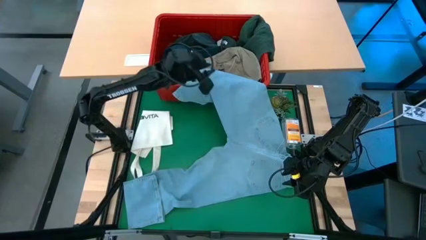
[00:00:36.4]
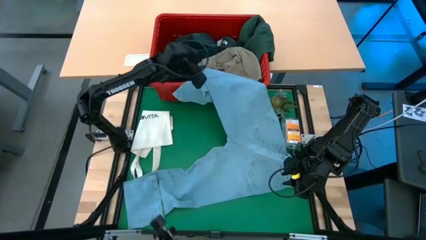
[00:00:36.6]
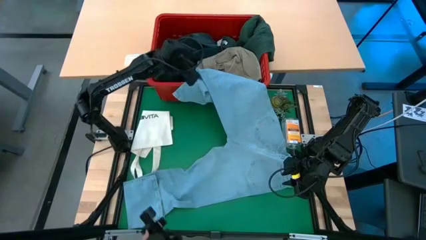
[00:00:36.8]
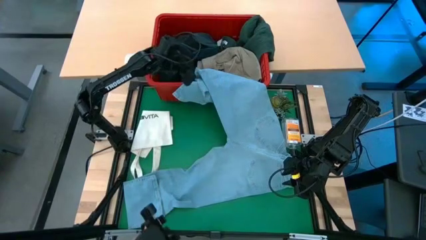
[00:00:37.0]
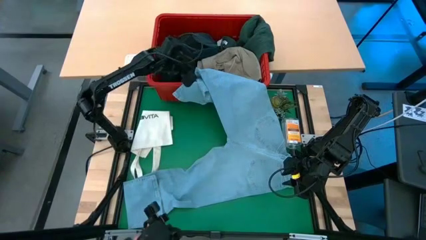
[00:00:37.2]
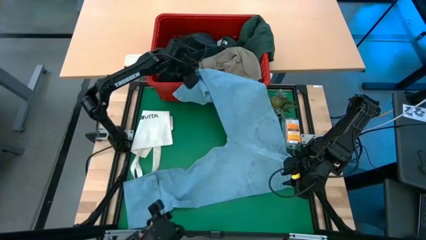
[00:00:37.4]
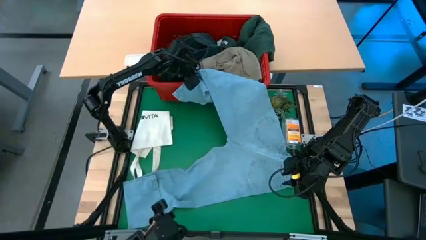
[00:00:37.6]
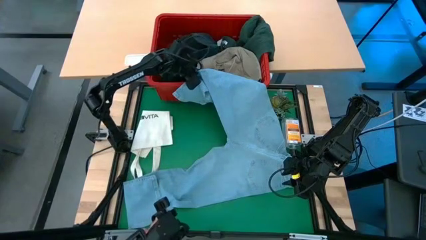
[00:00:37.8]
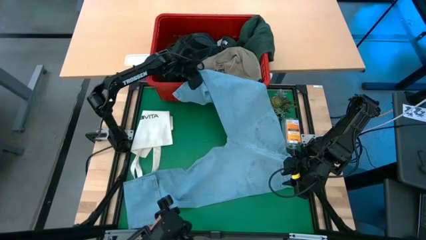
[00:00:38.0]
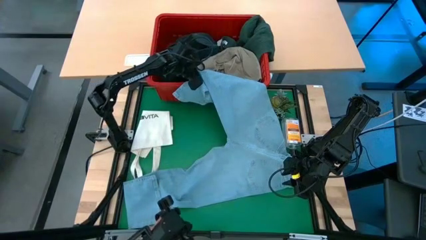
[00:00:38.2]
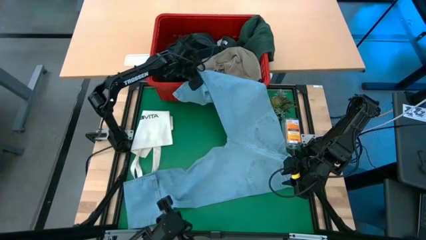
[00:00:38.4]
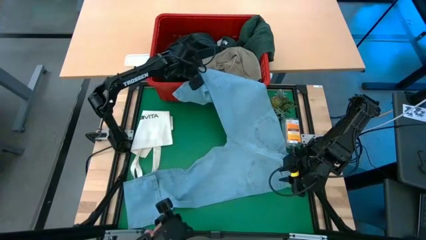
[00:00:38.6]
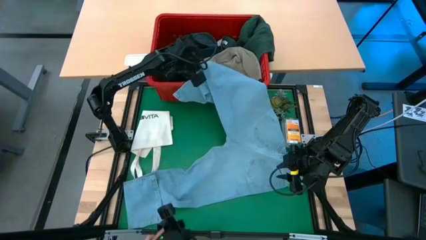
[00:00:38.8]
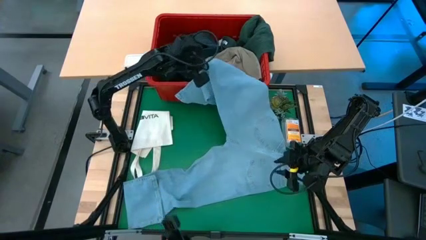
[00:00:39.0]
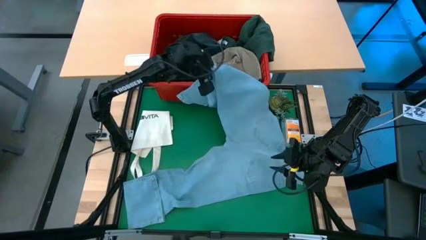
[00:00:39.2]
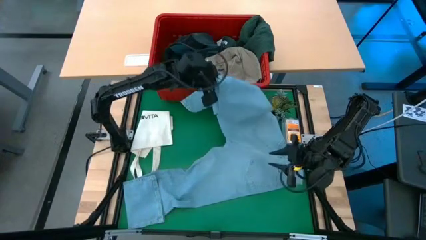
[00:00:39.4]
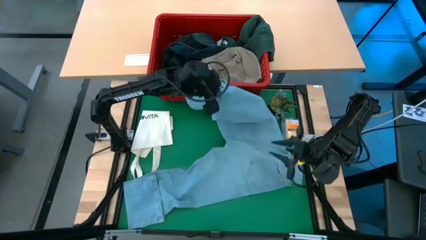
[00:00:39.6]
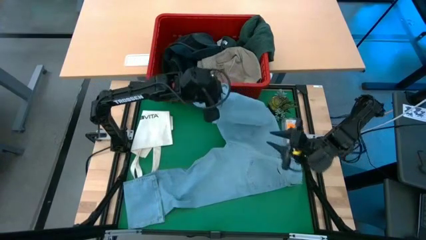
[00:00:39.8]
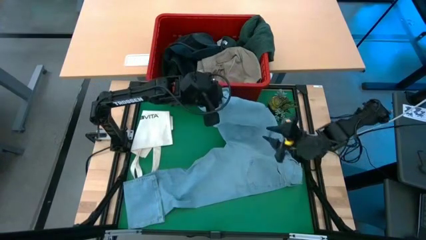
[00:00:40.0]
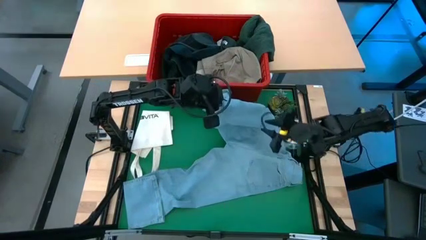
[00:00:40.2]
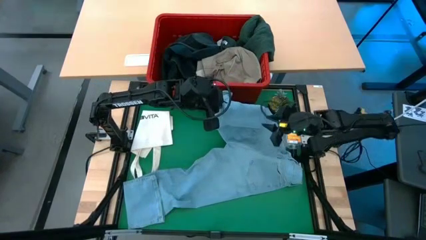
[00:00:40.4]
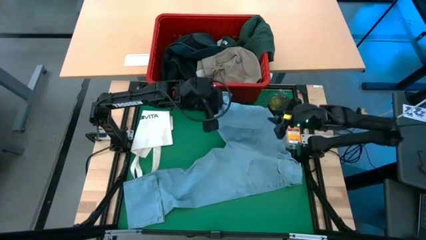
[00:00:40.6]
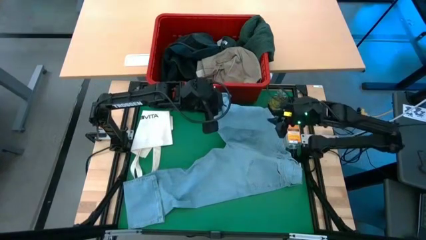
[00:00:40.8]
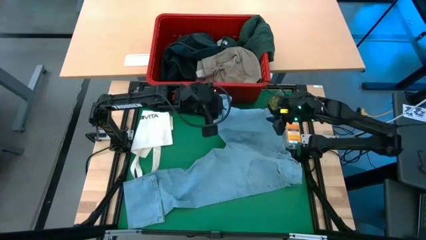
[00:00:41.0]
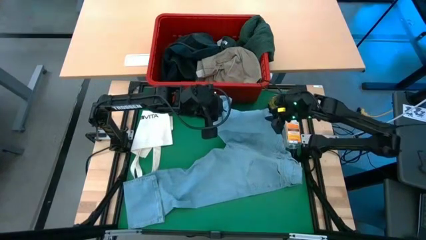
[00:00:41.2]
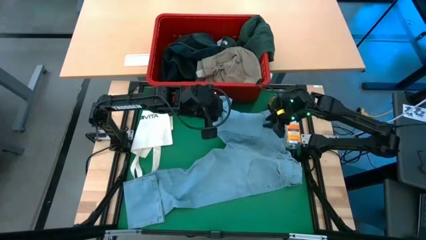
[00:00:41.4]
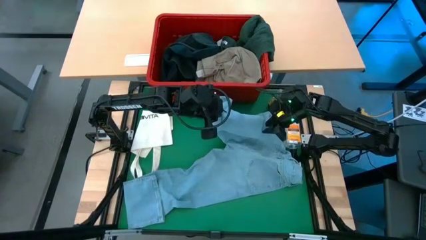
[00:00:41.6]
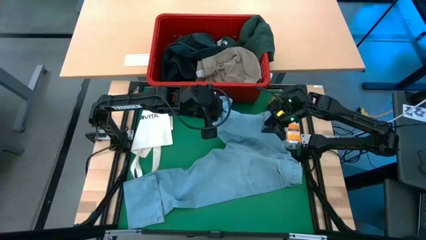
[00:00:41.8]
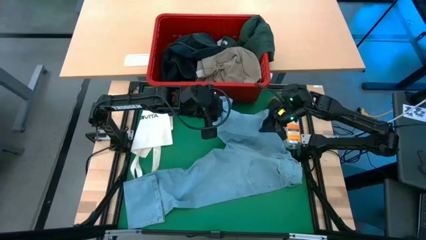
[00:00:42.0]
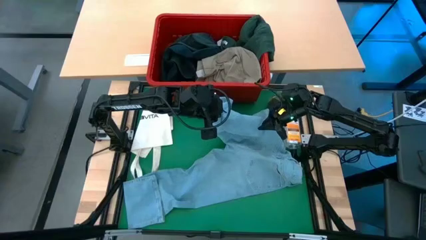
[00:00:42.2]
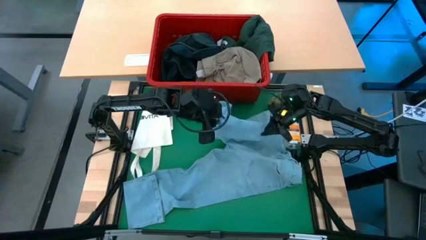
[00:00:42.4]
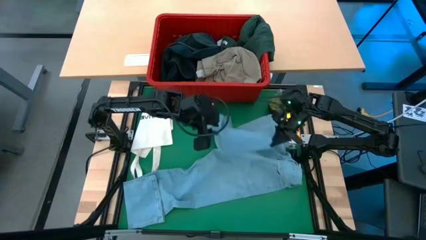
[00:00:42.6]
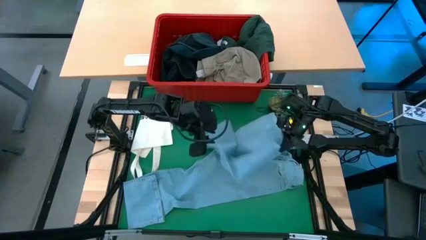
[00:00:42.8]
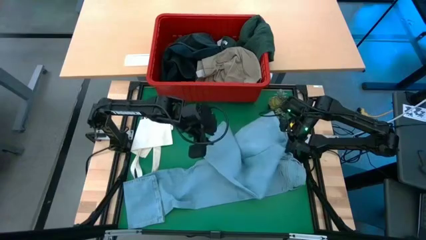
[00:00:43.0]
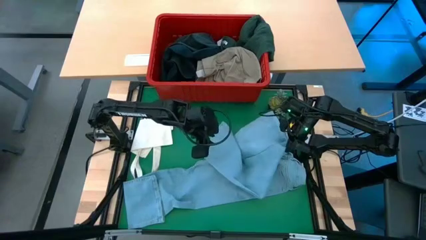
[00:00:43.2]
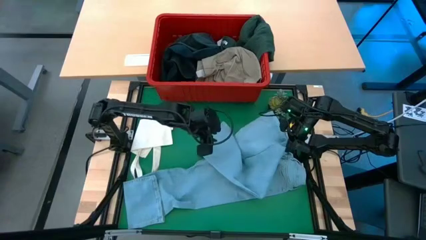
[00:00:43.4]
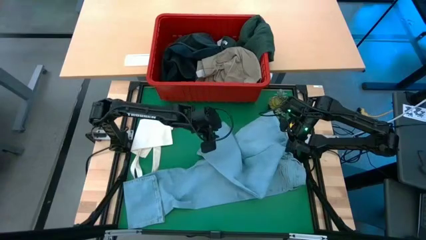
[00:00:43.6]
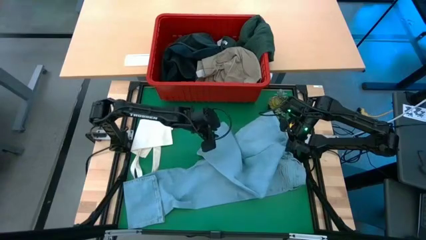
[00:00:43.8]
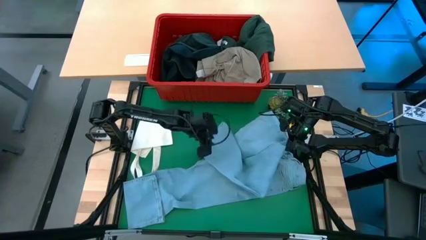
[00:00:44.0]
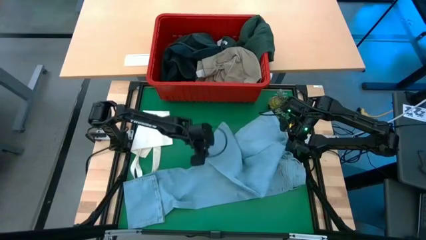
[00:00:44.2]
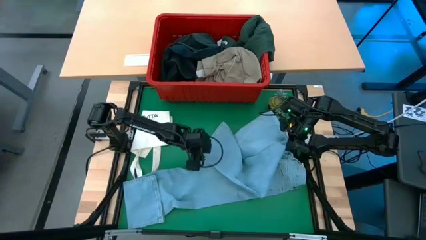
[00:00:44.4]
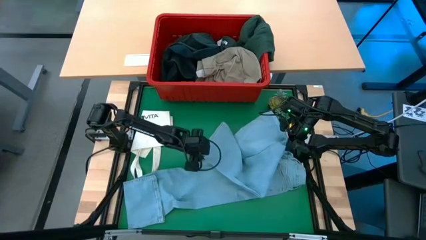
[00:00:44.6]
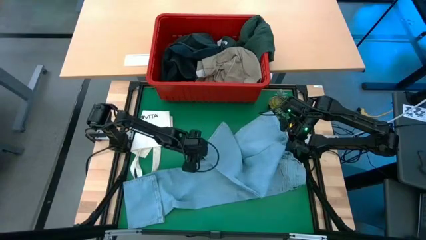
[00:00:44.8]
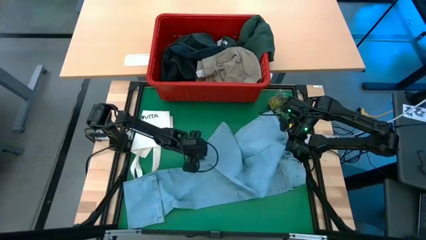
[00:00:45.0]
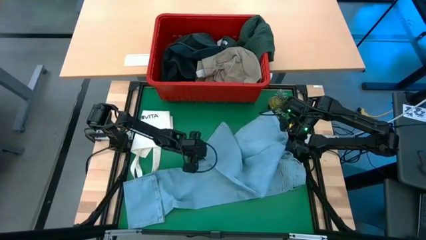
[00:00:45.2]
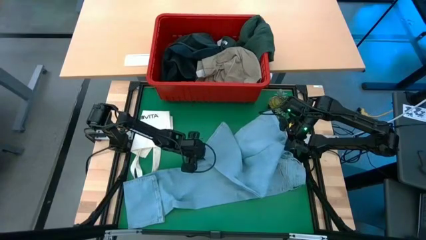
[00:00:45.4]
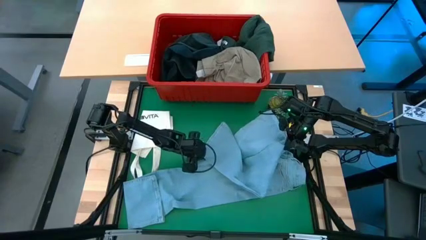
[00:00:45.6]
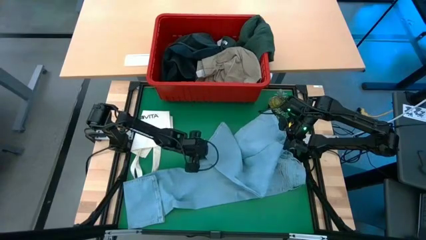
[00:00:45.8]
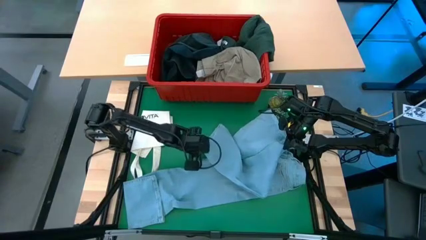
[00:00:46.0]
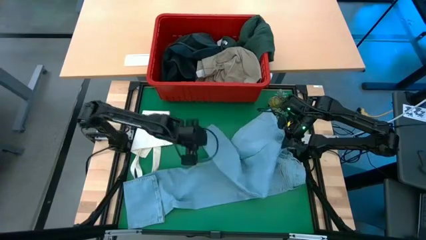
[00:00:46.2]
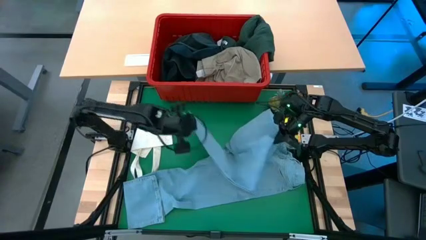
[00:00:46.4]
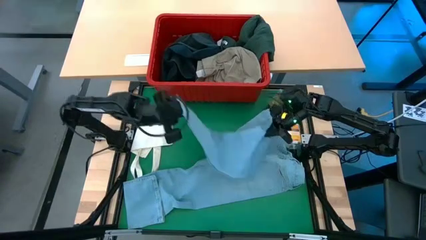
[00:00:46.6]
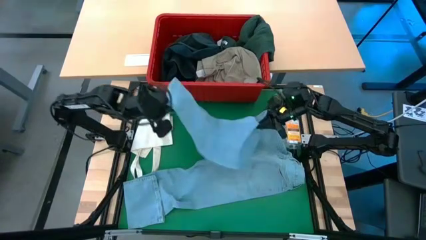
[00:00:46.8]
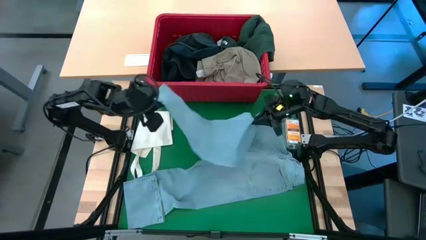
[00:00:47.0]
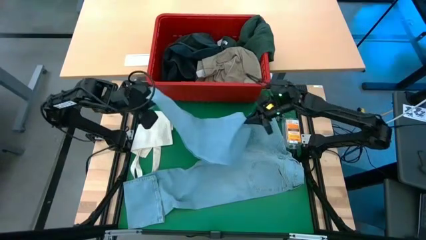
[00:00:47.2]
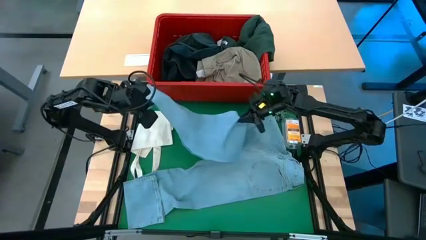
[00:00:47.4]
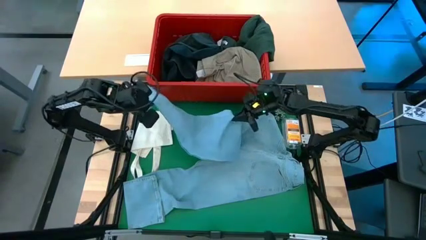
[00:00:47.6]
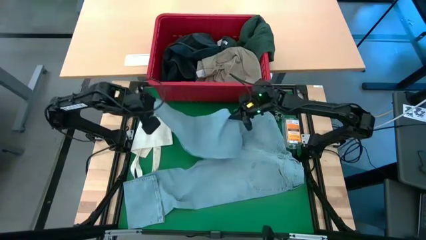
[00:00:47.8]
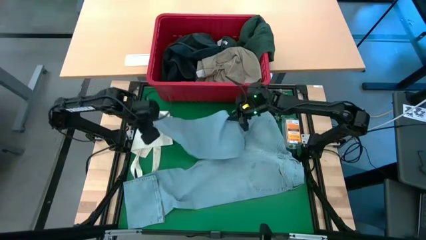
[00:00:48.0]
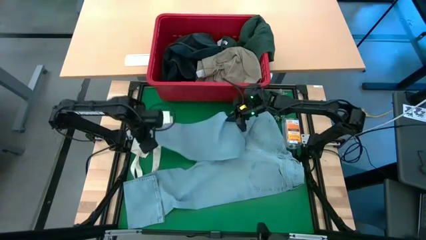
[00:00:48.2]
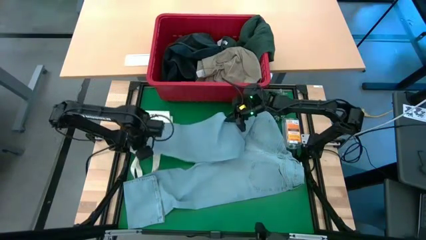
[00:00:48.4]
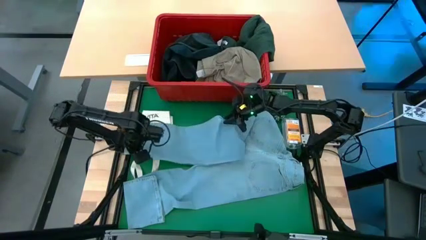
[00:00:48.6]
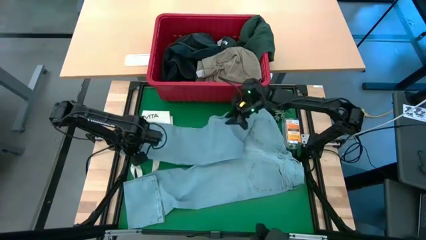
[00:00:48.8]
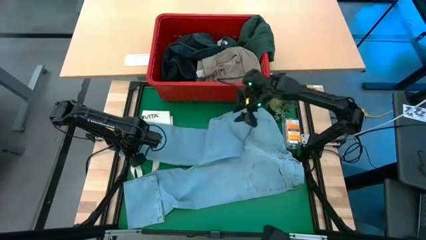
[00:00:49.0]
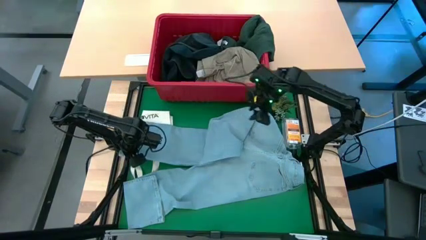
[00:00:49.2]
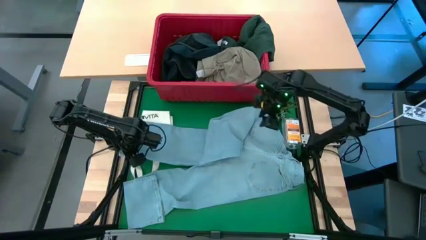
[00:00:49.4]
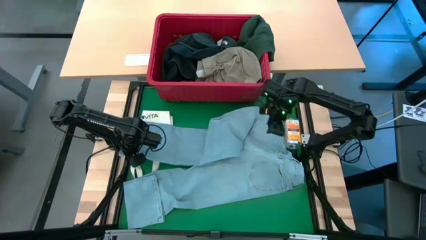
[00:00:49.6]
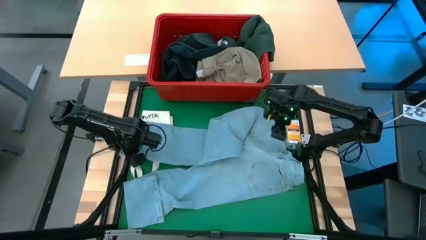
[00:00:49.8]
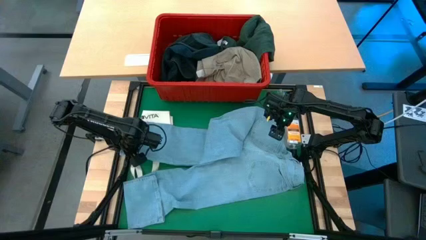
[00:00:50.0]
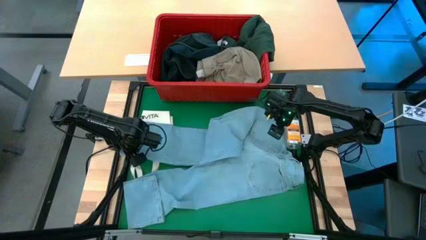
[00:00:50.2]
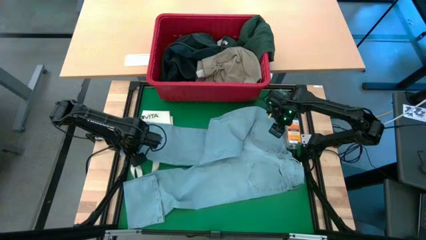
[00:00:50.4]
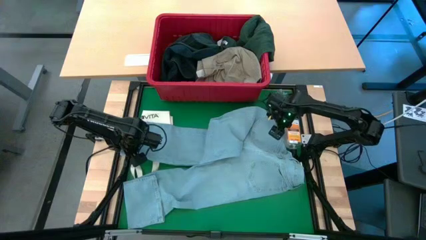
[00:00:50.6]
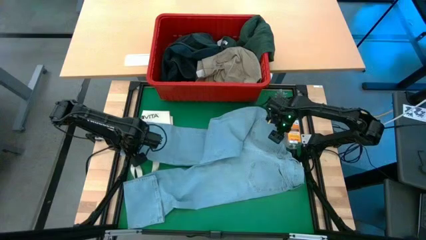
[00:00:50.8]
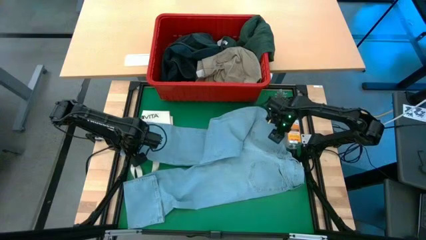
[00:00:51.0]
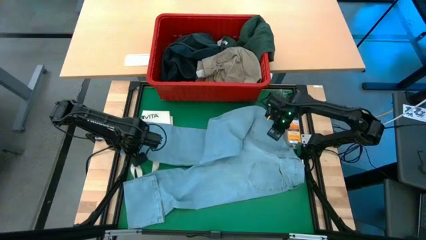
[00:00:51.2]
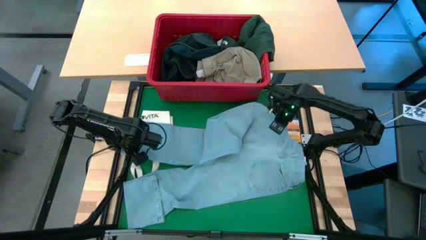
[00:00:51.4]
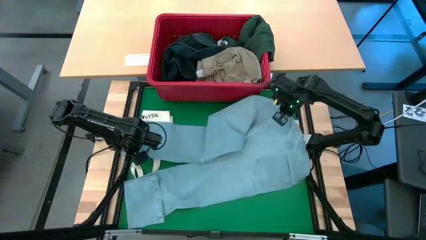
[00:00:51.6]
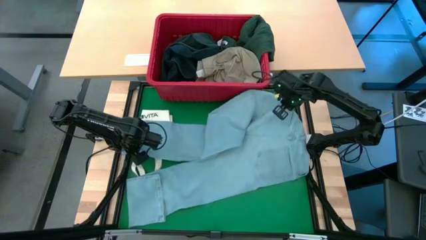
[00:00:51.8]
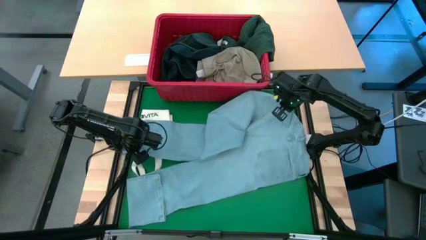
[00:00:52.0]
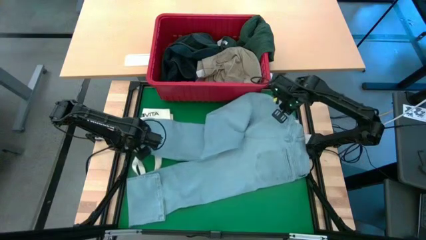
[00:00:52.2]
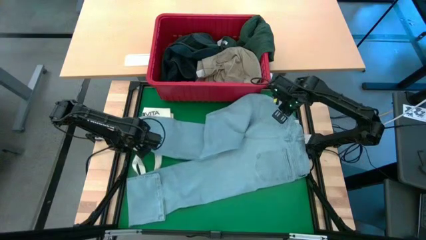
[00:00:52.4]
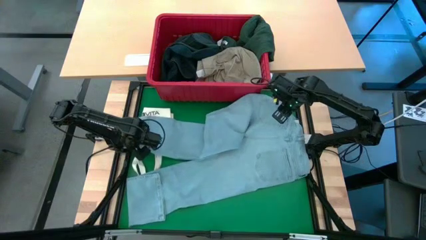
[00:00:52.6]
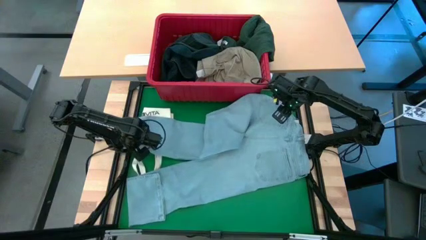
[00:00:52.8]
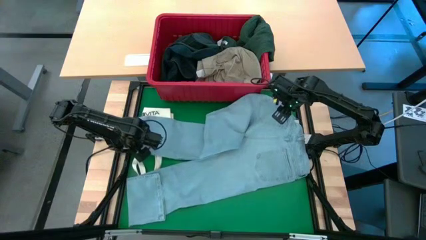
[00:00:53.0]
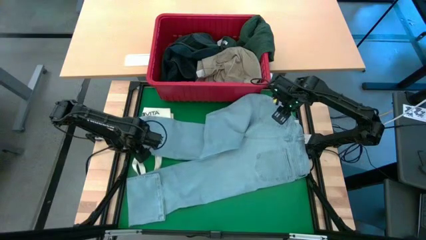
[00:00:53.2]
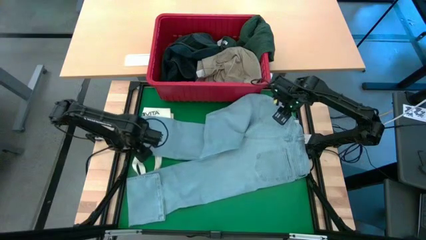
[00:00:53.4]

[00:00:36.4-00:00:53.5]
Task: Fold Laundry from Bin
Remove the light blue jeans from the red bin
